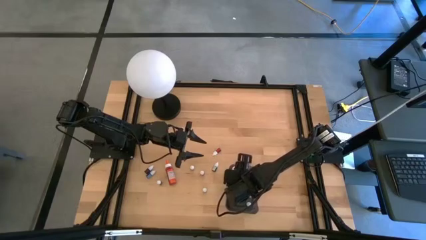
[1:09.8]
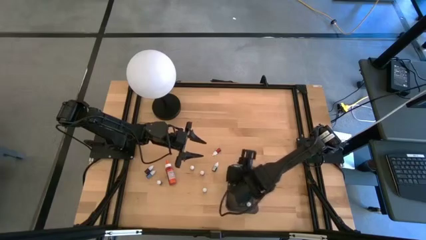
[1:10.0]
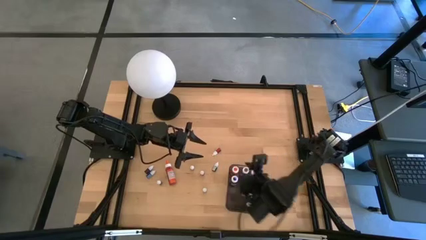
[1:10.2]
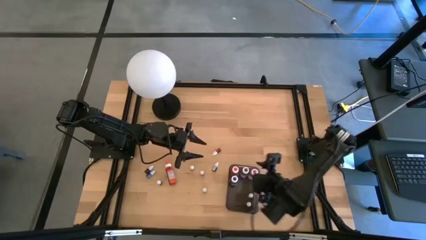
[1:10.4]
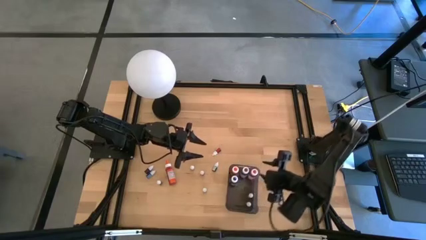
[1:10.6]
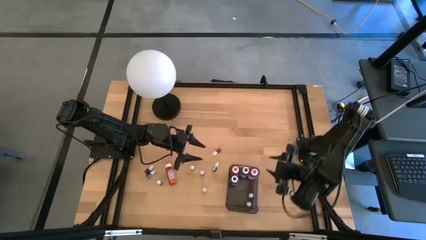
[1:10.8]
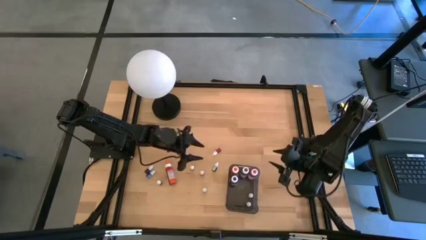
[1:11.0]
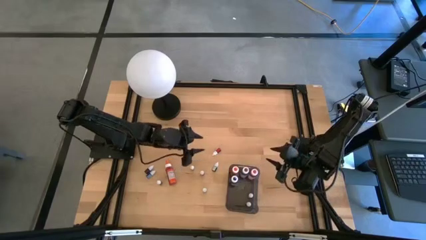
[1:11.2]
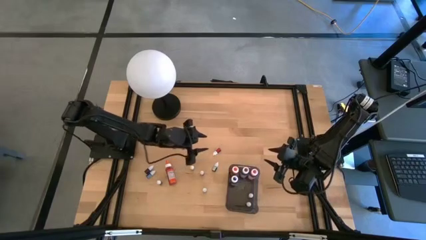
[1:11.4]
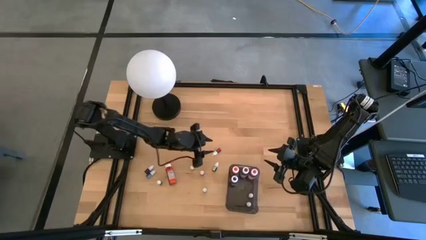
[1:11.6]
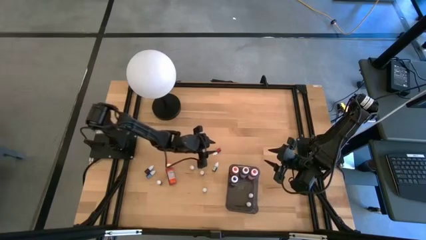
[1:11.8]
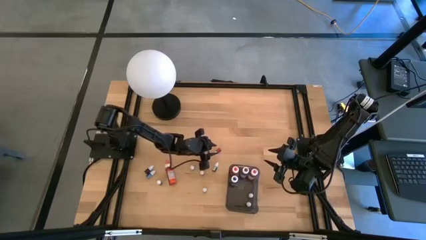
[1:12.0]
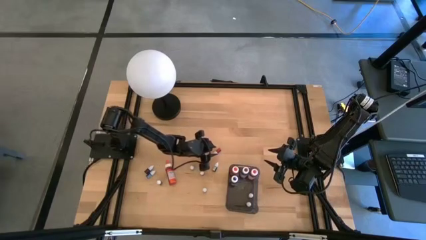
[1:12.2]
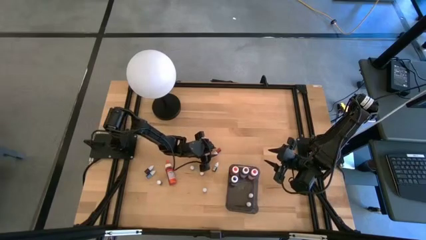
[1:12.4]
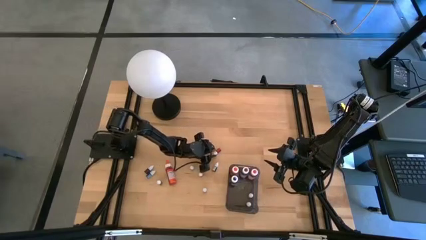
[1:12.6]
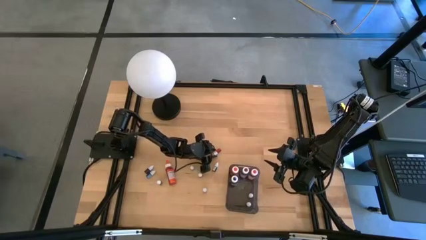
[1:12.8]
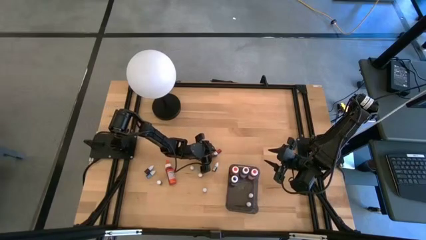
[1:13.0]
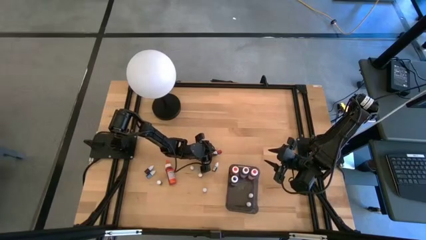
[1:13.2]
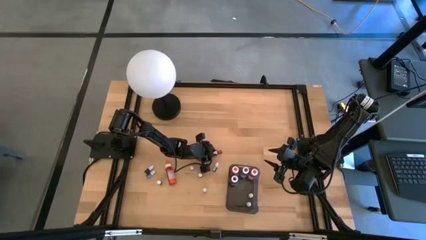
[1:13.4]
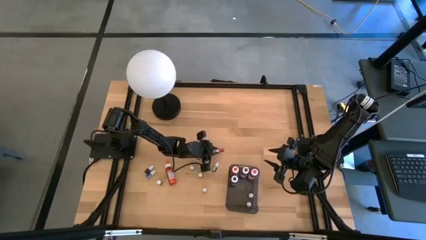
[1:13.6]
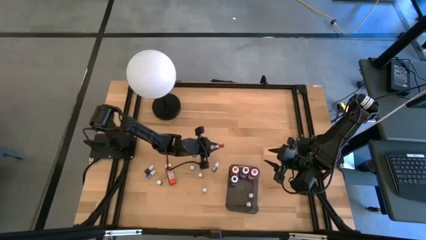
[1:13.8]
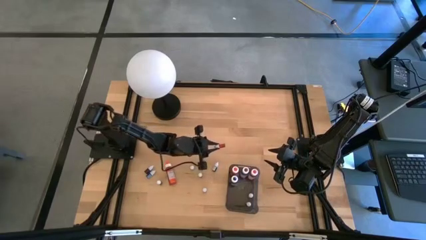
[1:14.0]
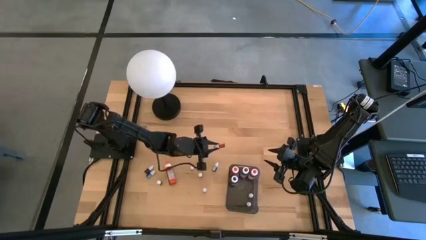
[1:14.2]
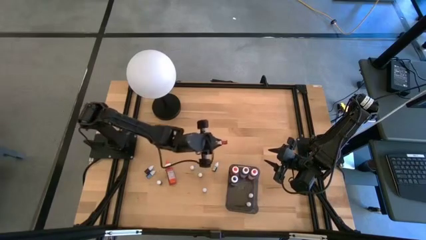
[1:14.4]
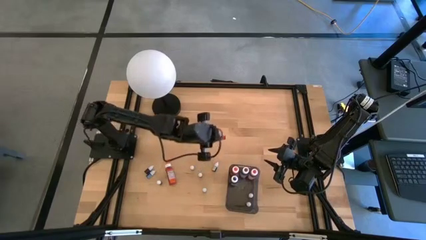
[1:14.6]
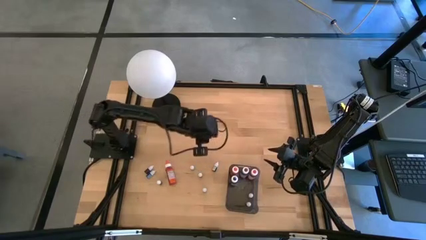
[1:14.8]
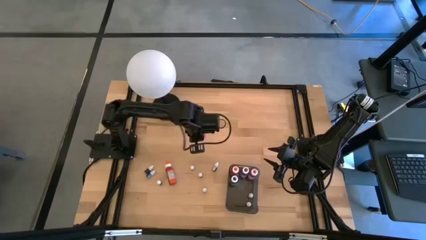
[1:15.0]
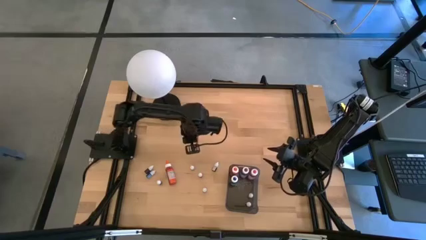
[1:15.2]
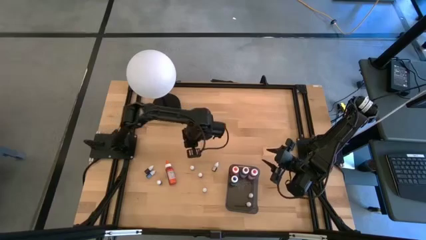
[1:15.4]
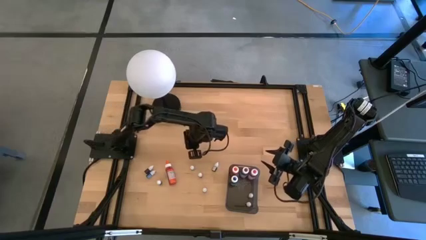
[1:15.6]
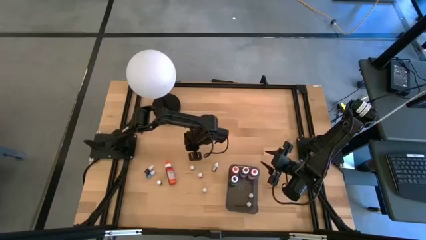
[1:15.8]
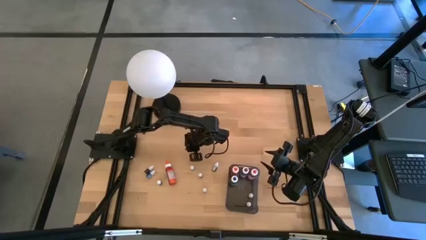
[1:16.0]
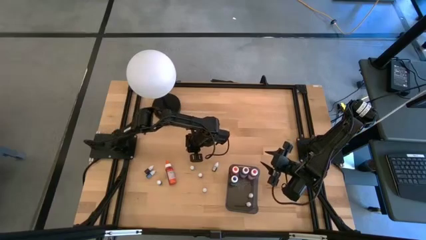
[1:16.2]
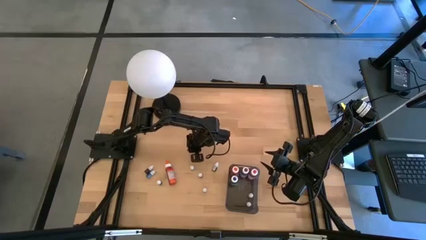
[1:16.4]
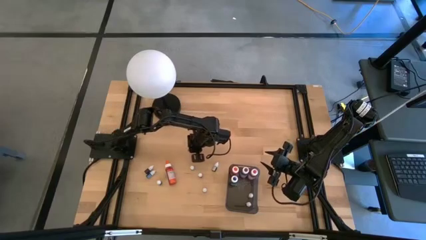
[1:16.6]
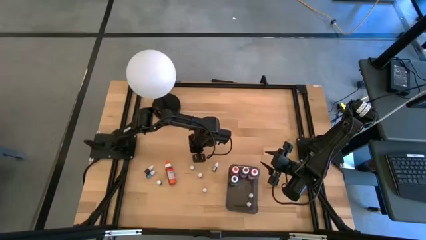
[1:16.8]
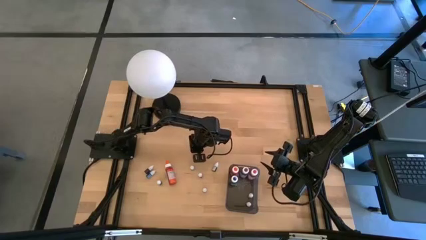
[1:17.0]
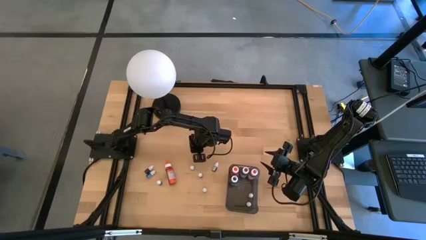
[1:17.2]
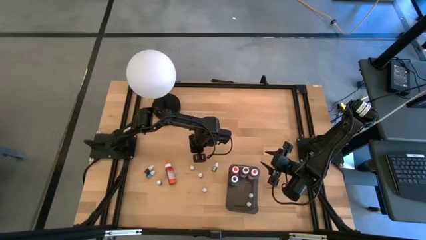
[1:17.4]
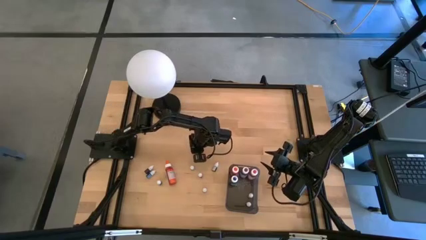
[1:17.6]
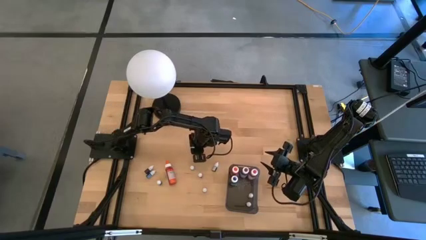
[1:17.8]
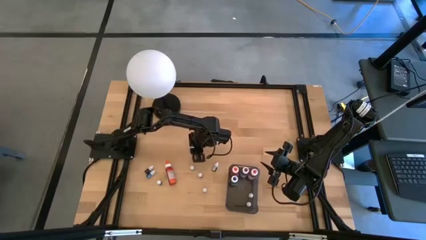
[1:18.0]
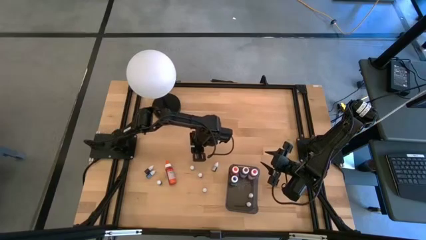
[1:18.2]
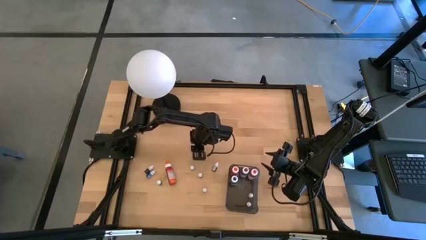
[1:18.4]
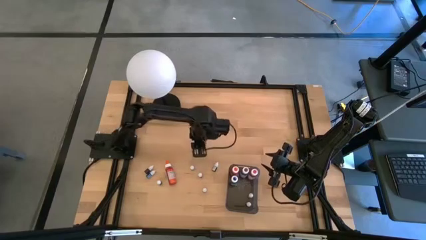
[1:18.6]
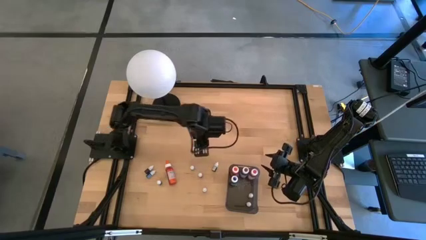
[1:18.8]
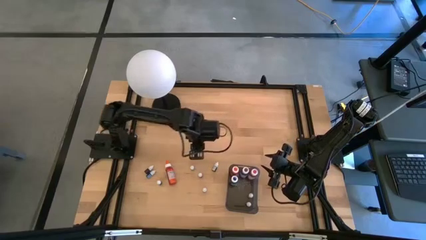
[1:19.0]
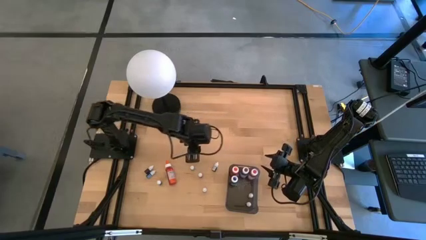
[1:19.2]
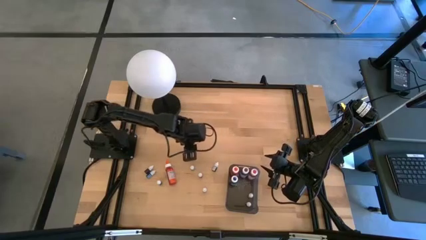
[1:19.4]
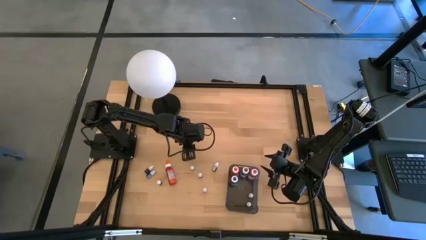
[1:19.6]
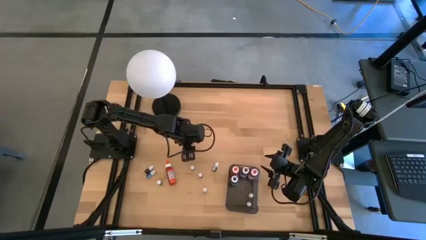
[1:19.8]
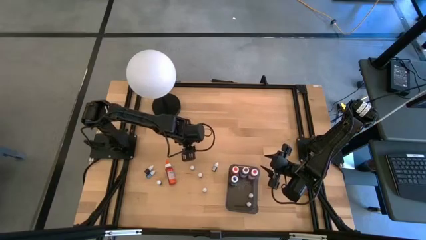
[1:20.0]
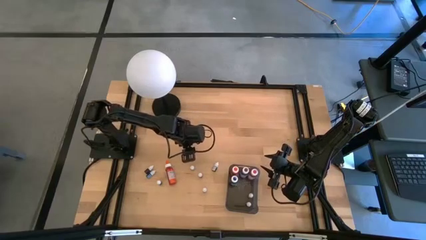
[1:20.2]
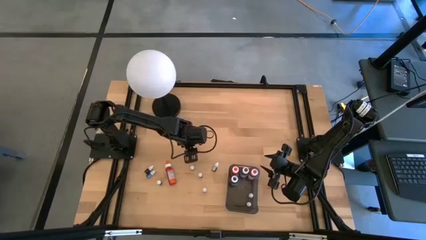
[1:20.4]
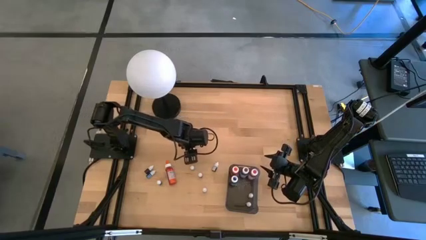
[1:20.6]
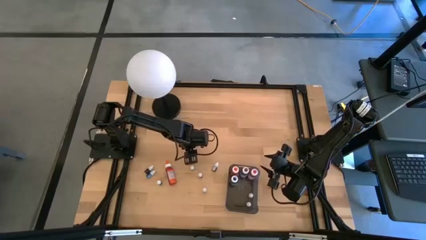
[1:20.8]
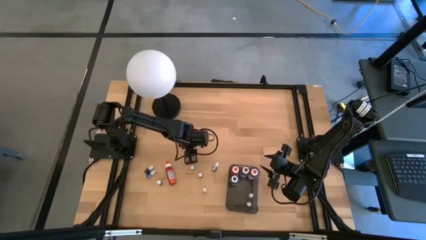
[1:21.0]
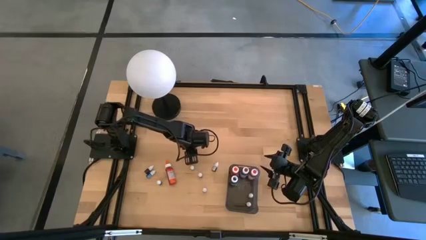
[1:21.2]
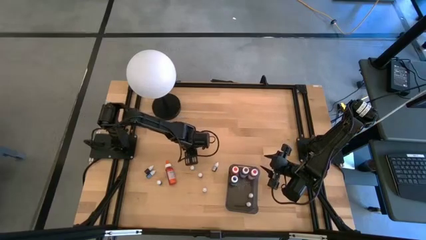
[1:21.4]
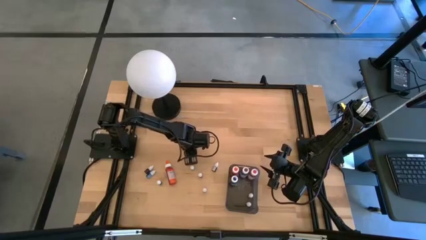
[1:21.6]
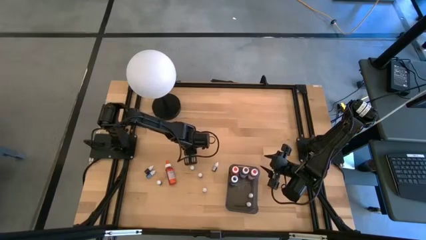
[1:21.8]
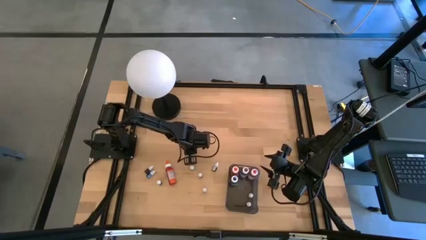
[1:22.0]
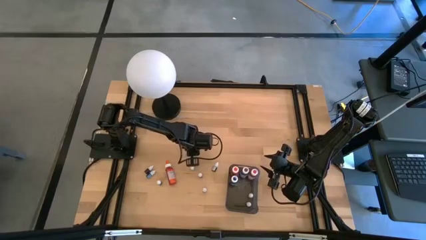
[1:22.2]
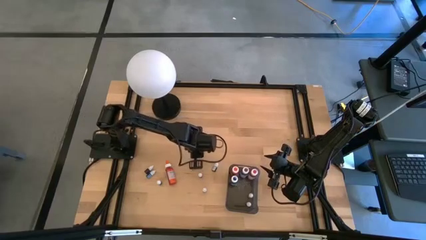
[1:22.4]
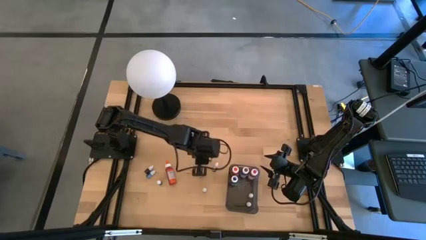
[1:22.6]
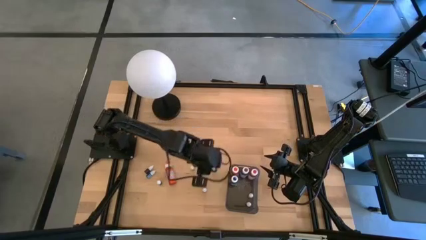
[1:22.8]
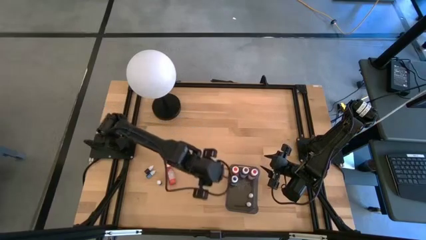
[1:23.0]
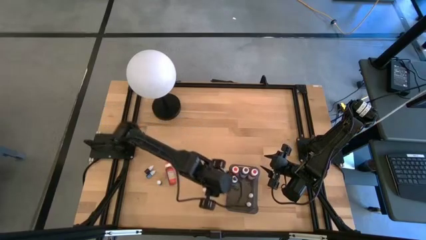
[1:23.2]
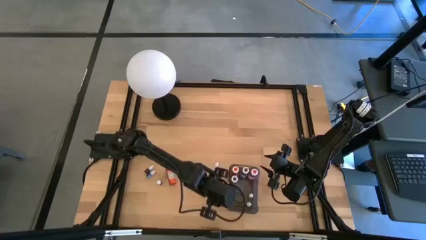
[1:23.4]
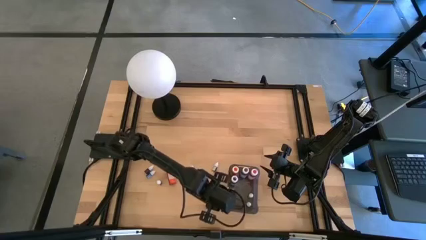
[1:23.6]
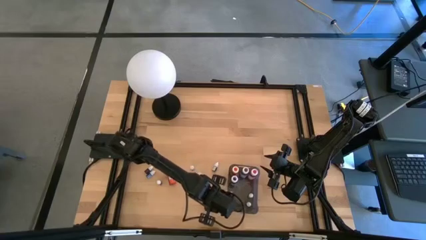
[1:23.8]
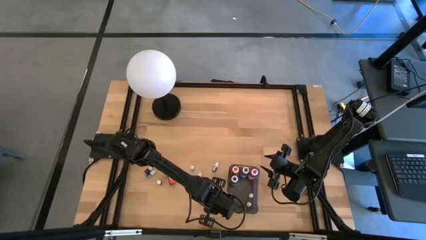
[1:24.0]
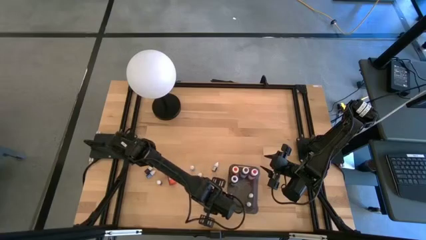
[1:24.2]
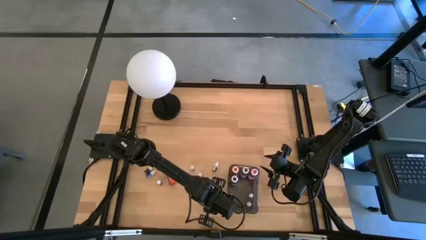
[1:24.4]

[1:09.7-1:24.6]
Task: Pick & Place food coloring
Put the small food coloring bottle into the black bin

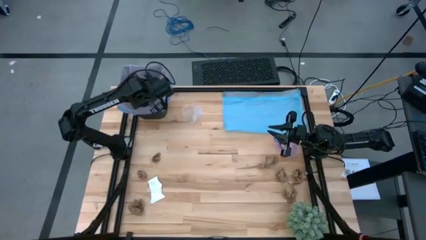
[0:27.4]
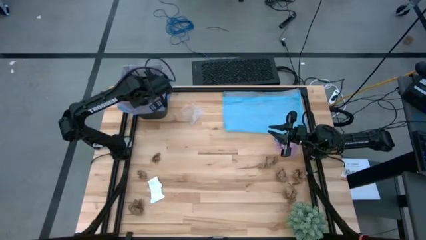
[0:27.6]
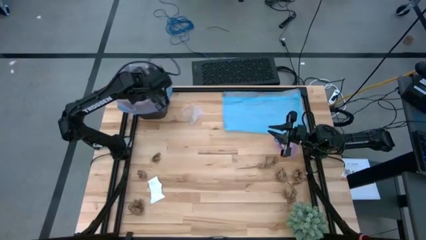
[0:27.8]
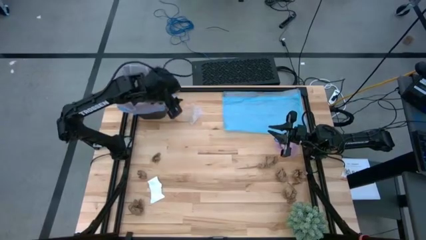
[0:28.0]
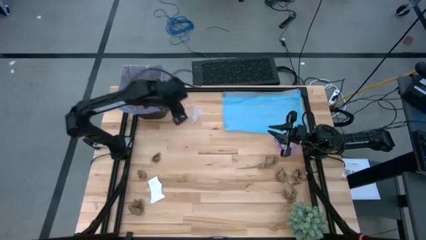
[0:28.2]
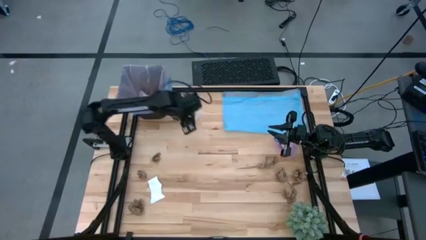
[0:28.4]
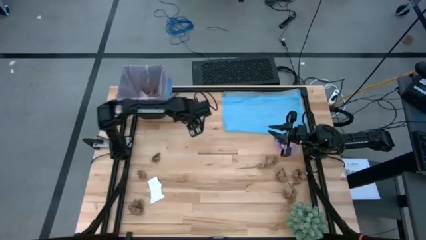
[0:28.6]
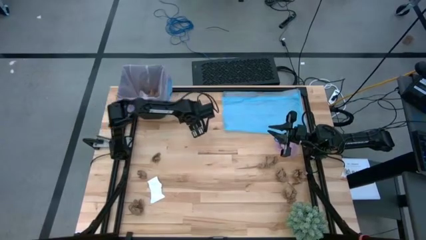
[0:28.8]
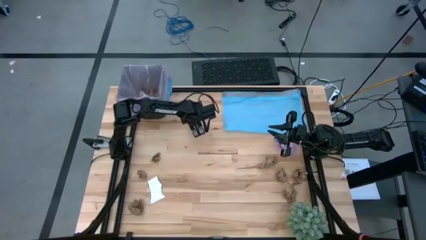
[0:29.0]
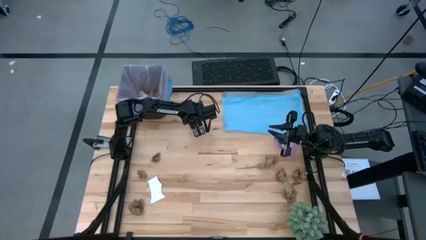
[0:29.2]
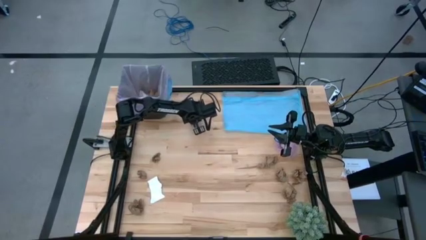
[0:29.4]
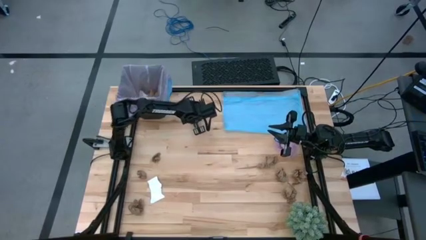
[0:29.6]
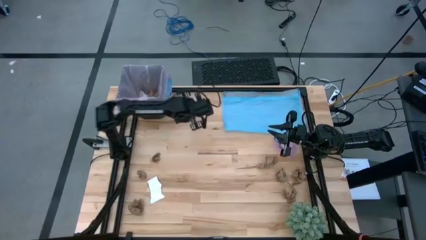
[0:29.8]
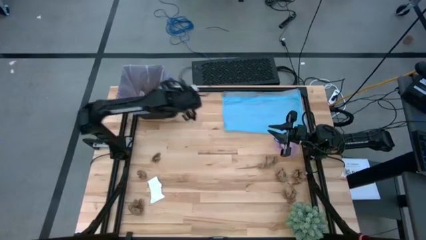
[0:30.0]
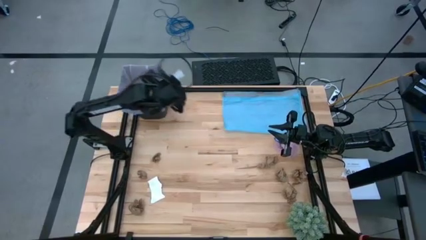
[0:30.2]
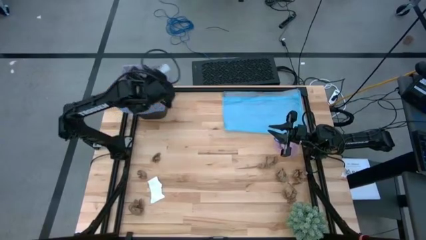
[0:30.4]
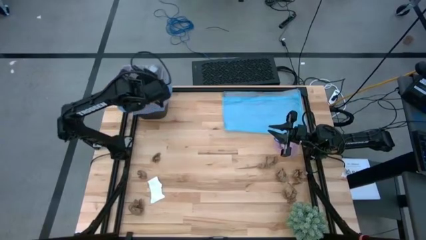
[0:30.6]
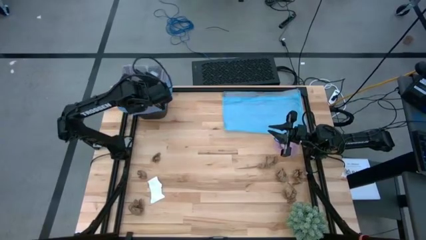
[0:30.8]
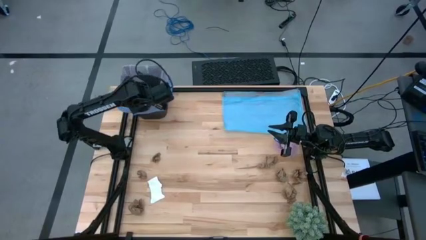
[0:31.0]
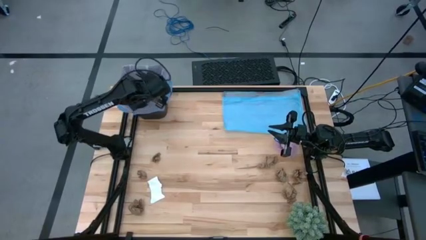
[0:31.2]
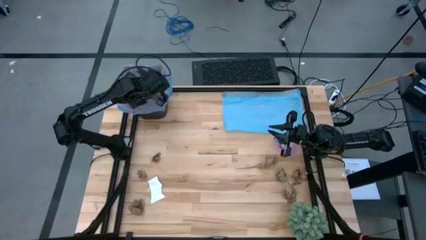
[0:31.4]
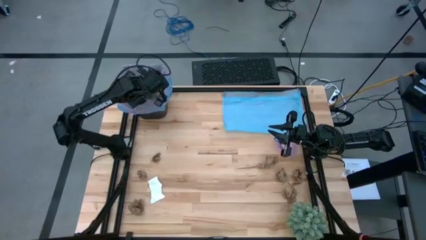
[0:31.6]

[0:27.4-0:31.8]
Task: place trash/remove bag and relplace
Put the transparent plastic into the trash bin
